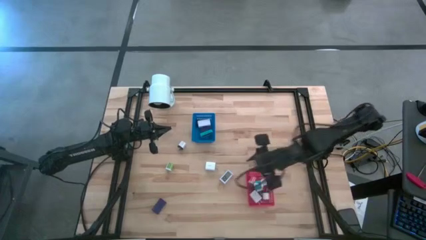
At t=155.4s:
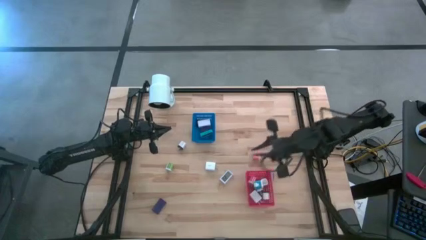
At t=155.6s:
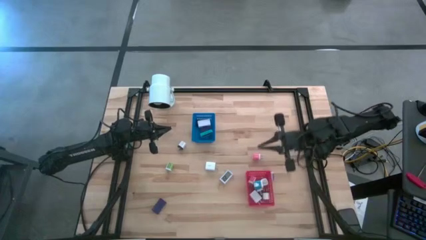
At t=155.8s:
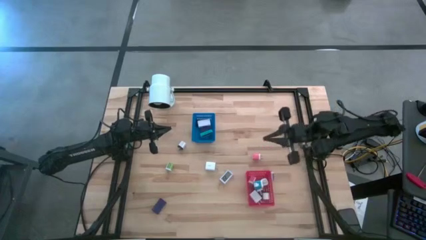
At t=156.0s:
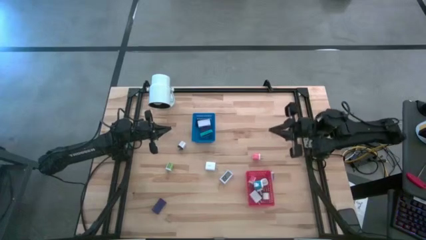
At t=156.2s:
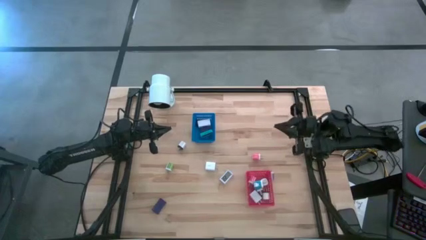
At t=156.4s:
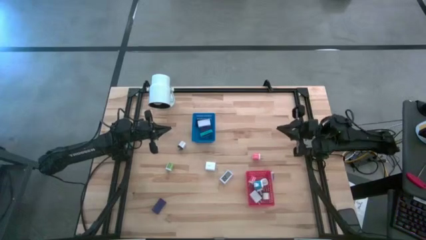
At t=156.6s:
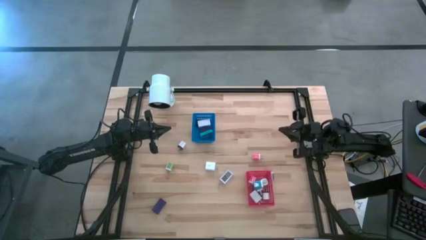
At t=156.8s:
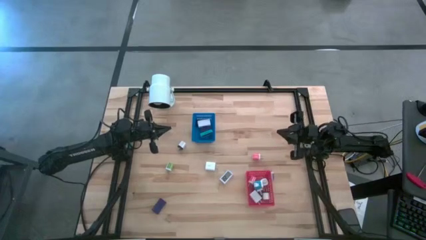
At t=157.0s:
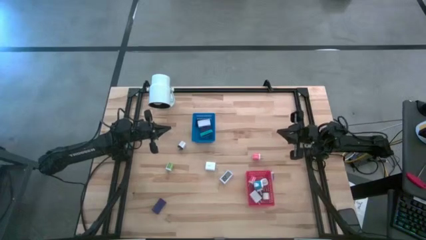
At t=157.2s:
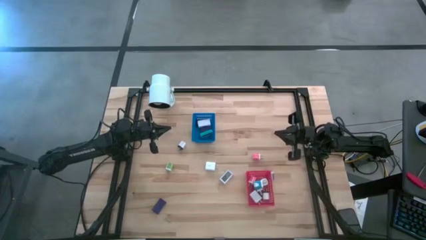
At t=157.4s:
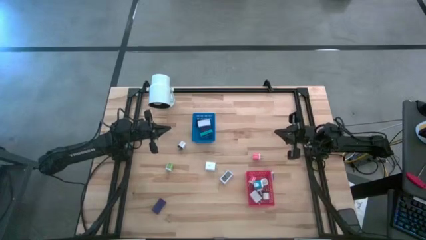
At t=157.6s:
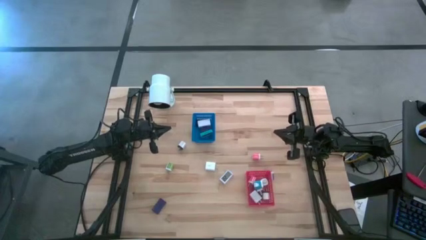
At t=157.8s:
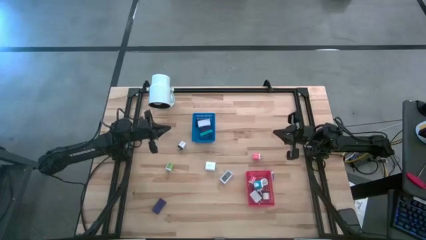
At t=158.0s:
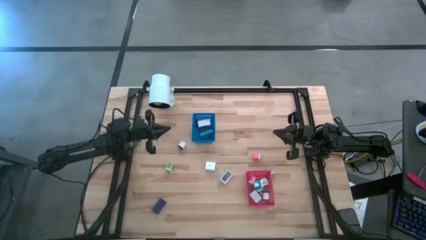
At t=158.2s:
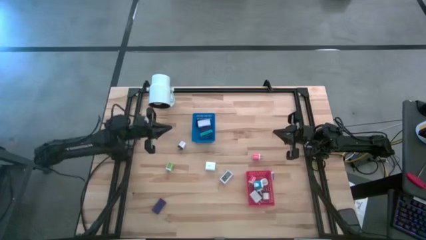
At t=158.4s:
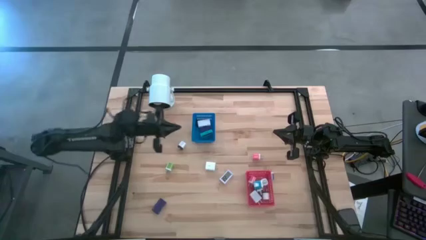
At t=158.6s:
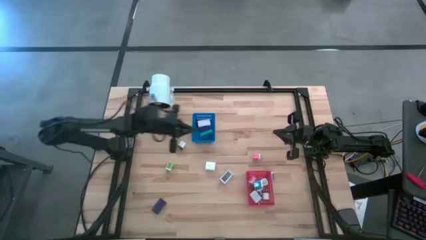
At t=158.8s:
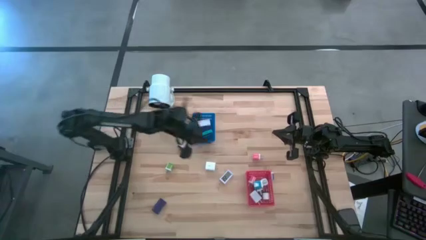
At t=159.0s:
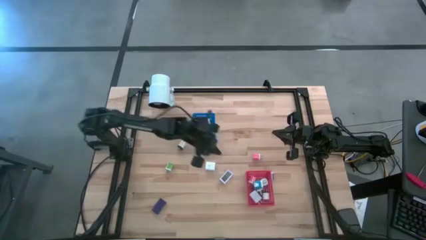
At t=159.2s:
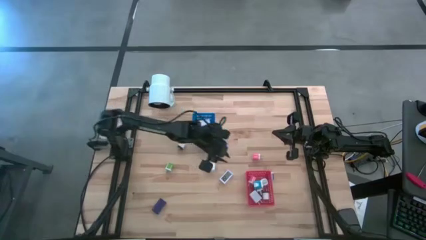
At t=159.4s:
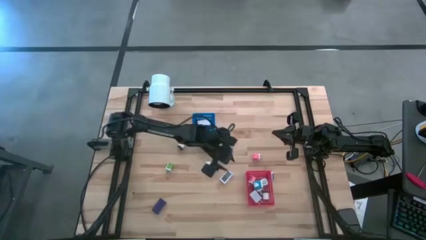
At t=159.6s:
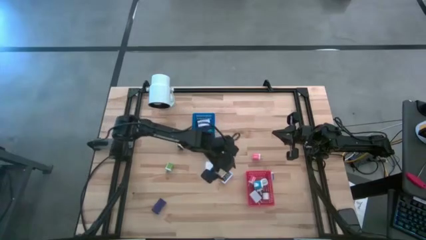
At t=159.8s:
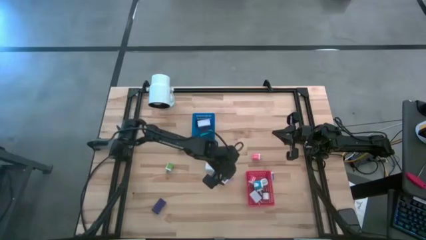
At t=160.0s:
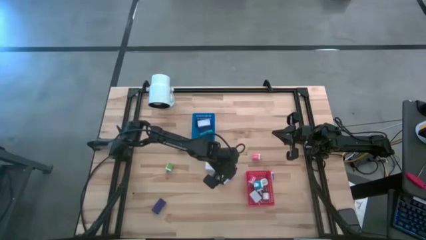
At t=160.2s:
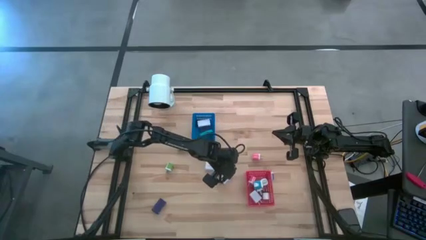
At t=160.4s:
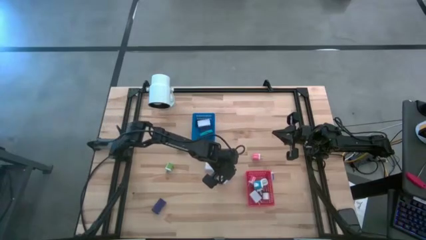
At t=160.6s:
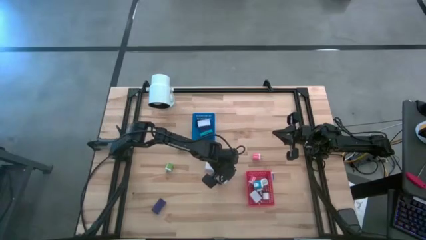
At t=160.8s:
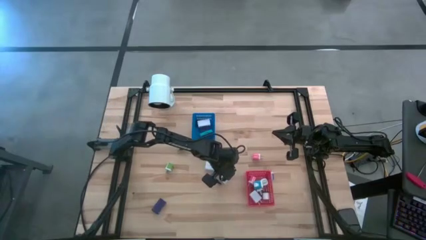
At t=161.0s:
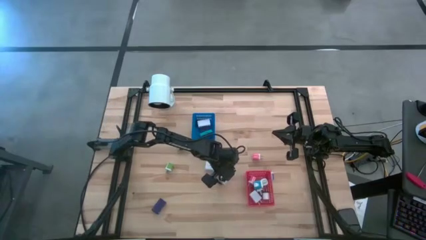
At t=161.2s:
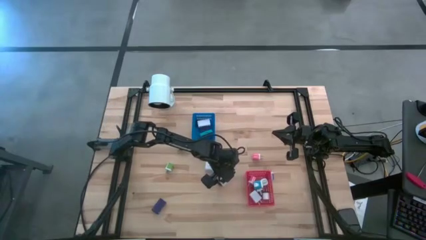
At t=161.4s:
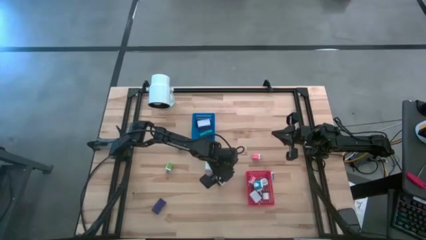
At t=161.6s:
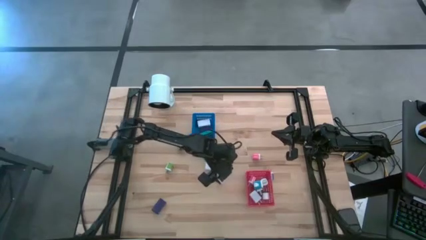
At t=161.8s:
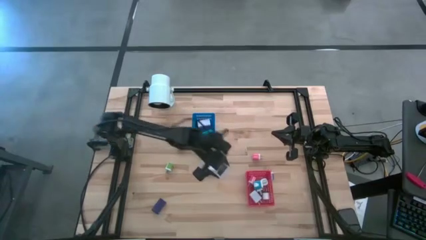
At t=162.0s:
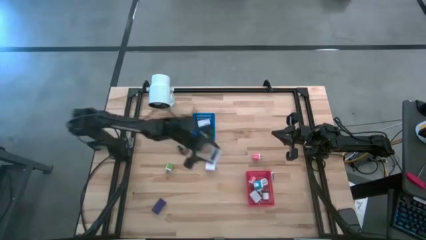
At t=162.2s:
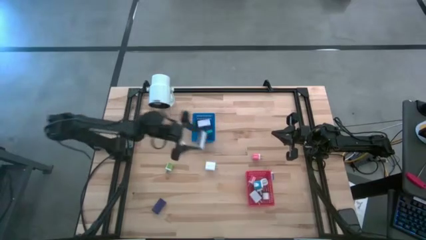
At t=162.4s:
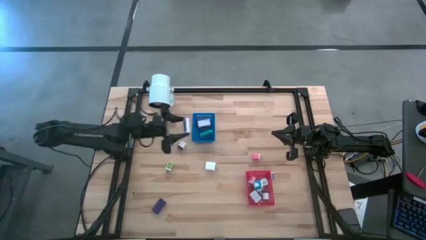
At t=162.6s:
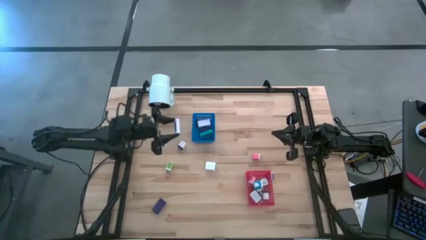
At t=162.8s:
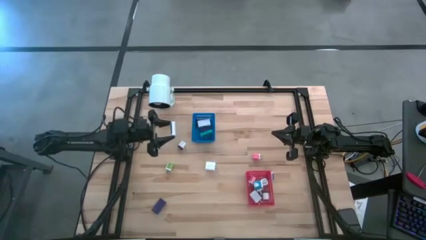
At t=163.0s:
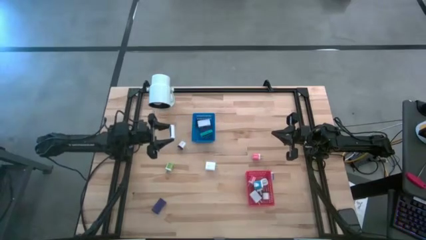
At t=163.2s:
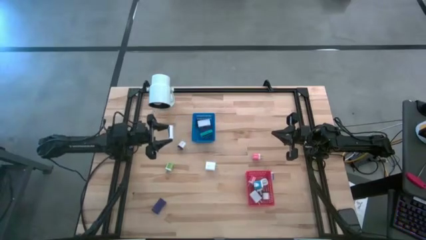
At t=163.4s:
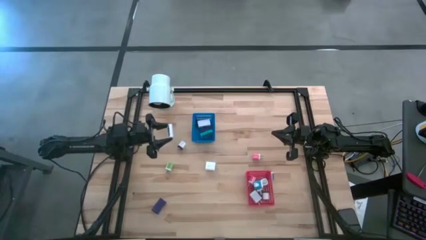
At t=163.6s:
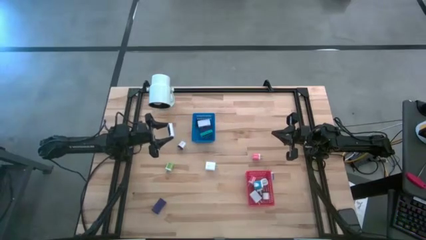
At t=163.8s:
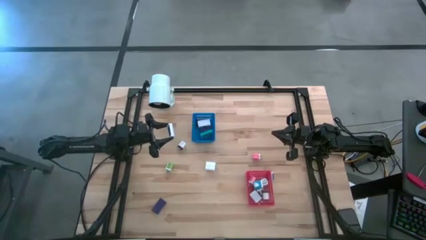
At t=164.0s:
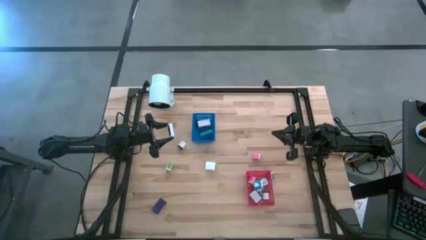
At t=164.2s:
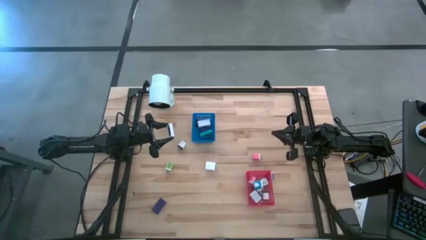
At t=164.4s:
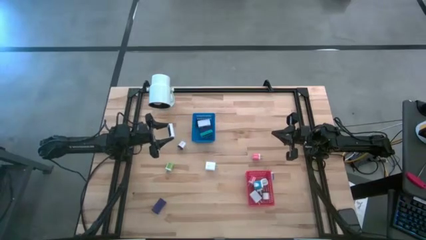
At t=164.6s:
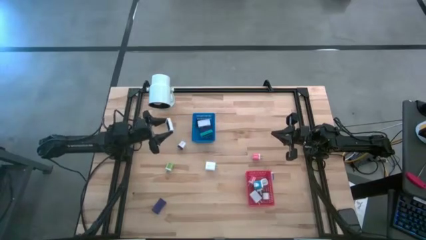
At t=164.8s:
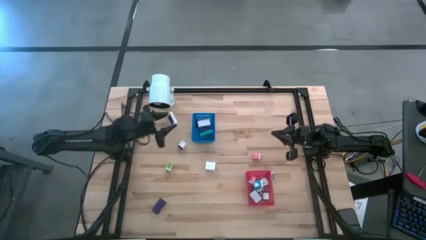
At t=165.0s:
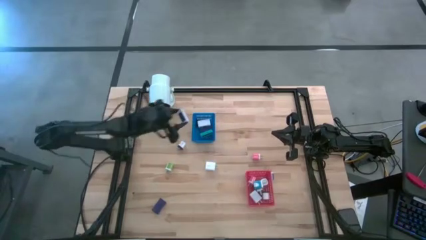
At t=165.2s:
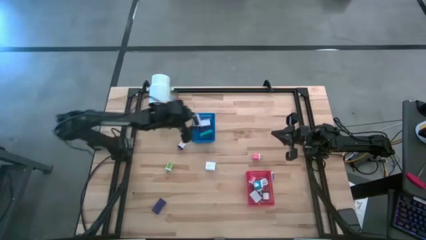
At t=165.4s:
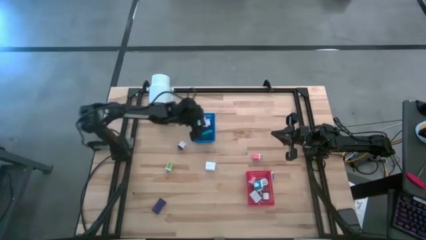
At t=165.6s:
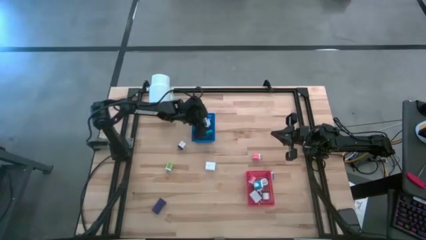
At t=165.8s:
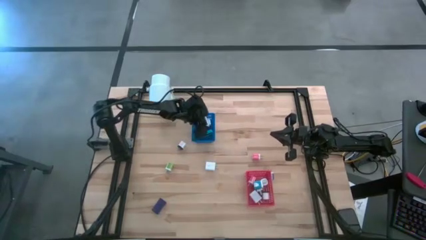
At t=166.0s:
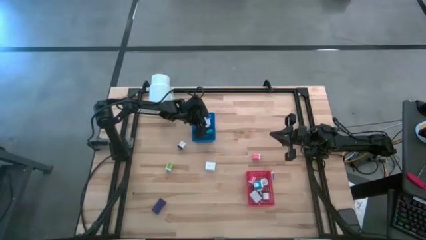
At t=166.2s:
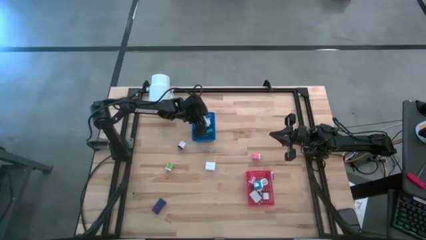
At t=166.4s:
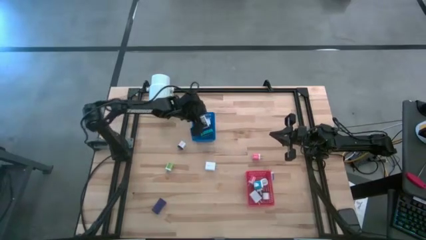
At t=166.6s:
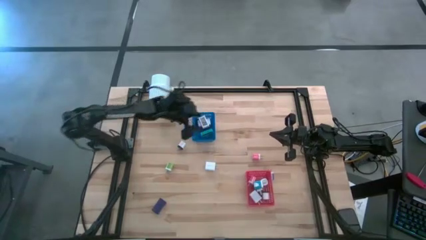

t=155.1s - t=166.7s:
Task: Pick & Place Office items
Put the white digital clock into the blue bin

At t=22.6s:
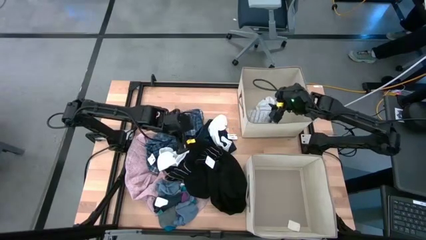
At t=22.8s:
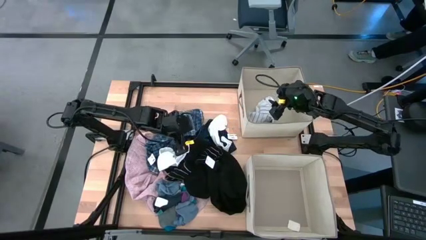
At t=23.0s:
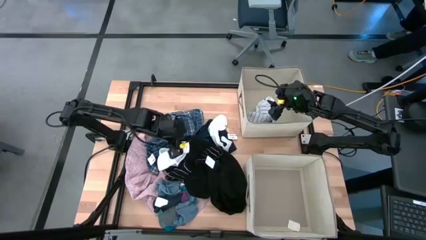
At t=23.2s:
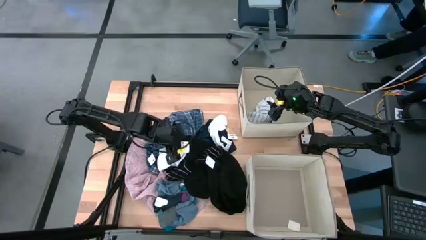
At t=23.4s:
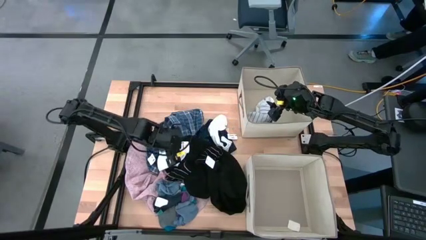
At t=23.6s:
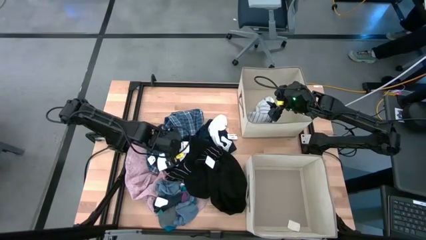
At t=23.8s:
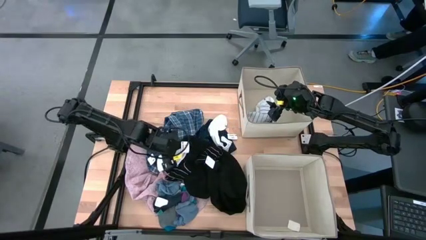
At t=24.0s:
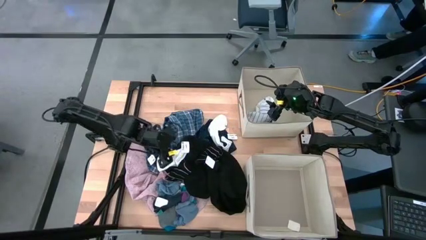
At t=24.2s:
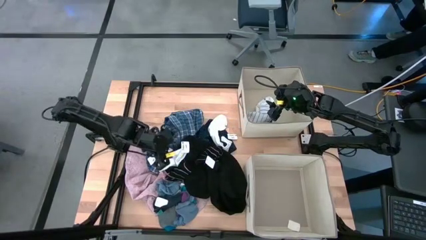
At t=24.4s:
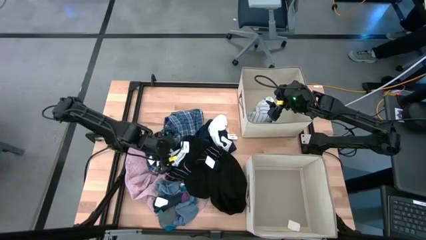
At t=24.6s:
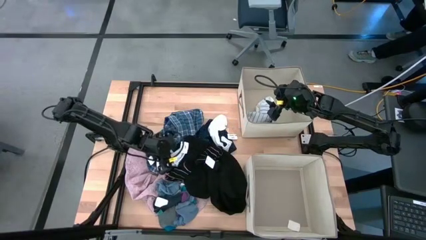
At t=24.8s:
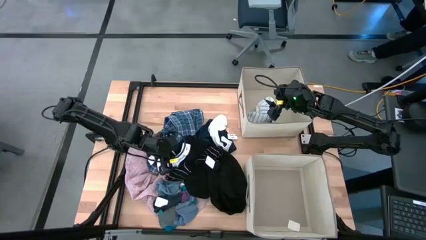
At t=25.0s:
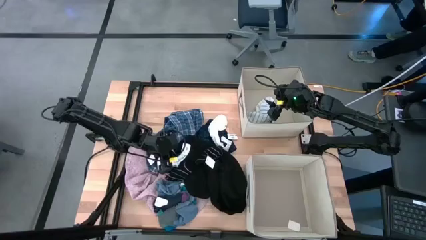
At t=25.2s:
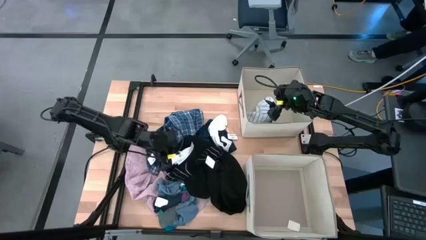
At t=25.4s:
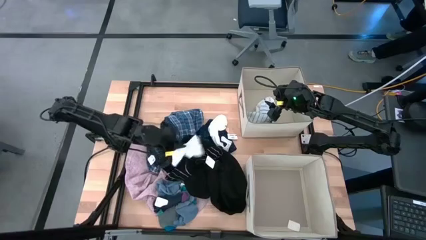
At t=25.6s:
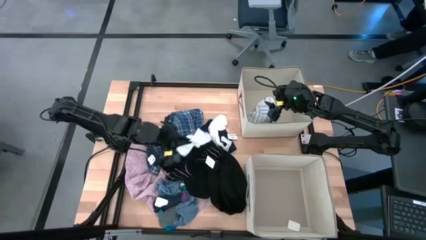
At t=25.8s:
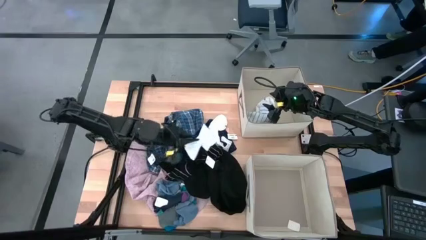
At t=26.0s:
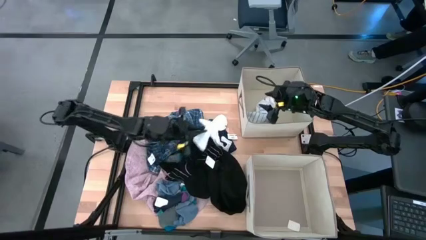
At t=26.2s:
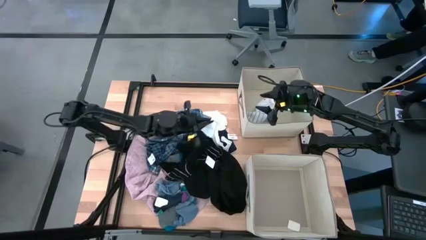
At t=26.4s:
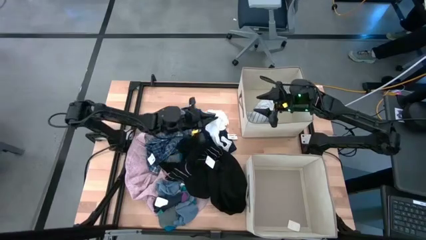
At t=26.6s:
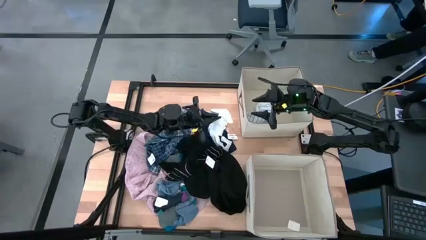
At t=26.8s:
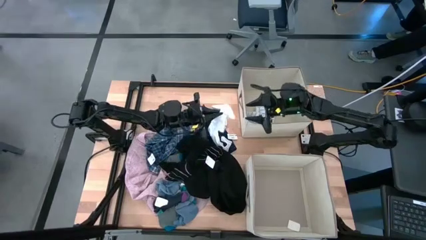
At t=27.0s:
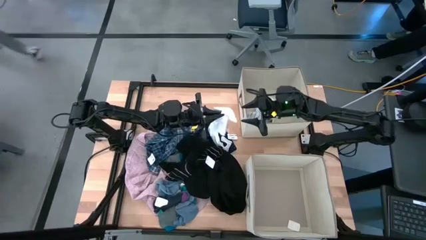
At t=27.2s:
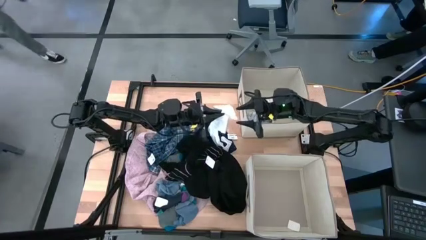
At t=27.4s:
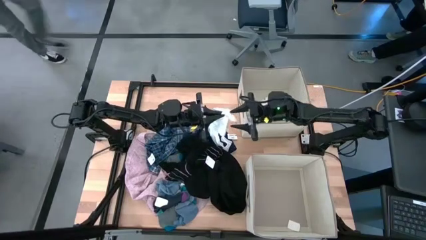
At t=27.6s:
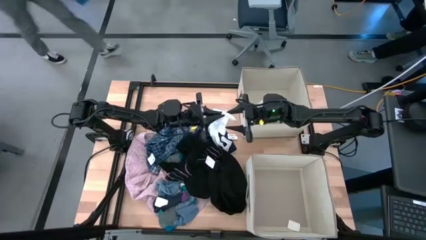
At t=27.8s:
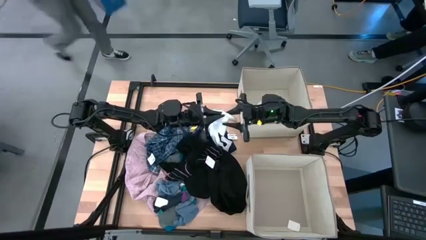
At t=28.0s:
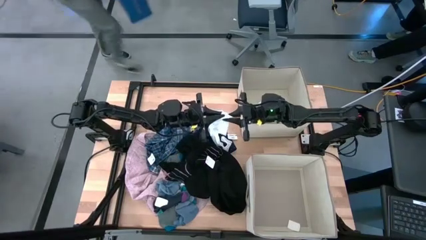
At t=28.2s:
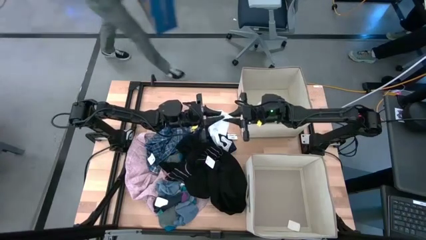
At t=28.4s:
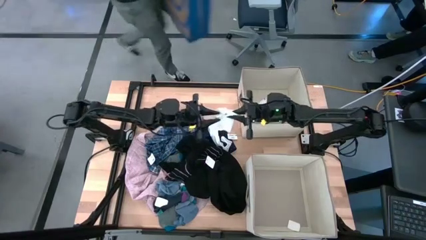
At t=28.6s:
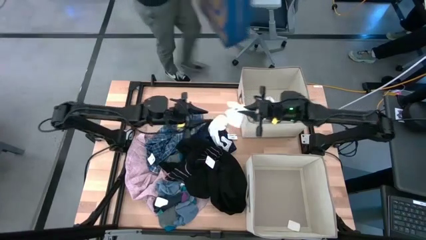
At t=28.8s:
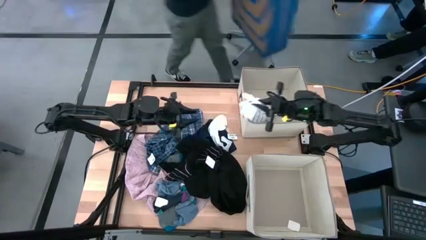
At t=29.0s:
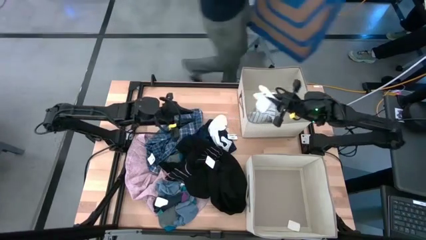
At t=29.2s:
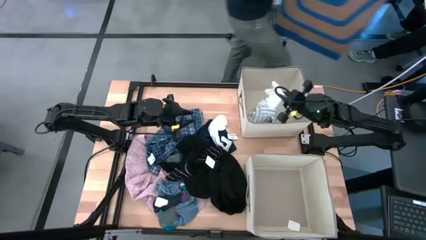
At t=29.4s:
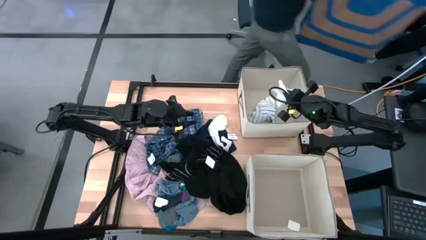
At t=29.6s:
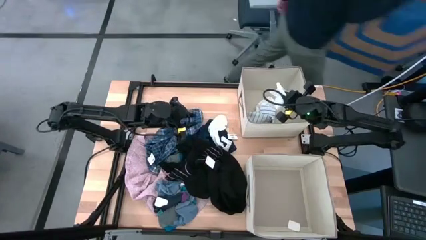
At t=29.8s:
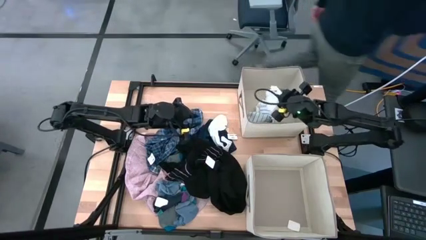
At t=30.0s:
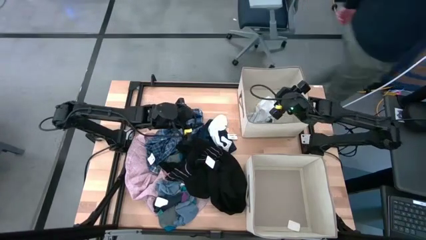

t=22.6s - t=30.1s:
Task: Sort clothes
Put the left white long sock into the top laundry organizer
